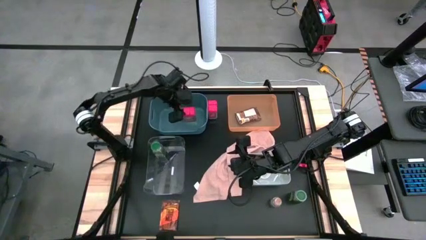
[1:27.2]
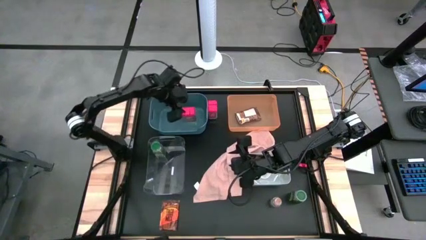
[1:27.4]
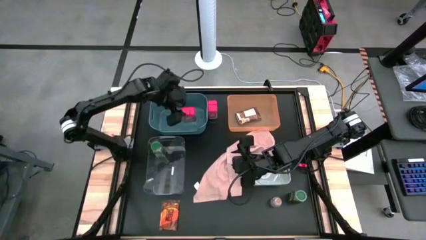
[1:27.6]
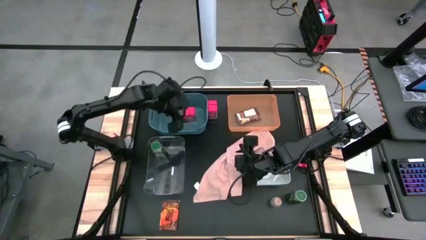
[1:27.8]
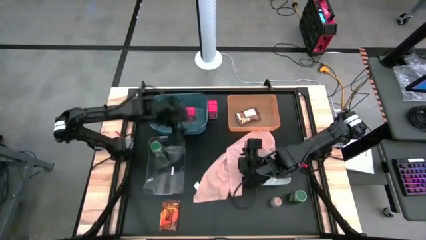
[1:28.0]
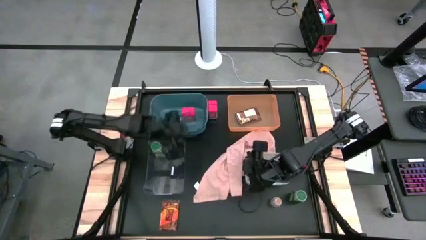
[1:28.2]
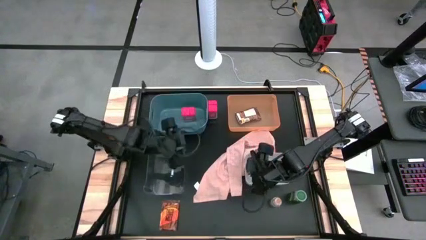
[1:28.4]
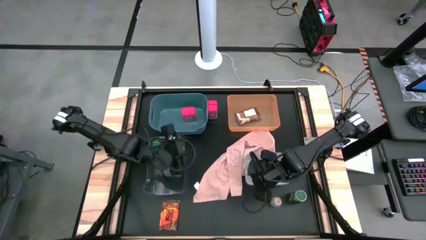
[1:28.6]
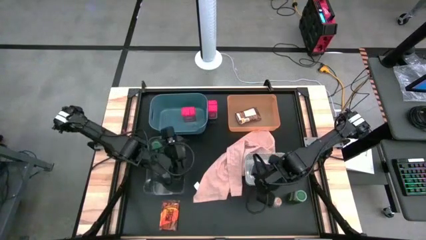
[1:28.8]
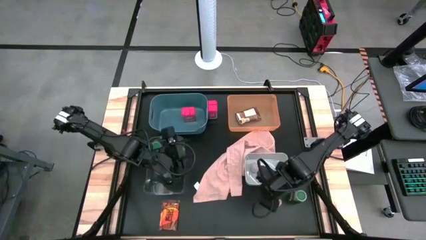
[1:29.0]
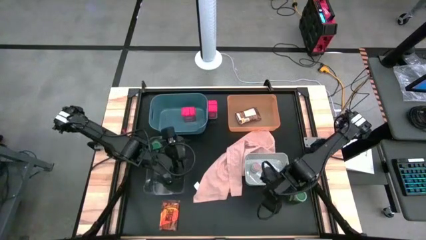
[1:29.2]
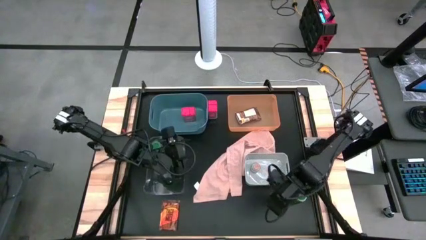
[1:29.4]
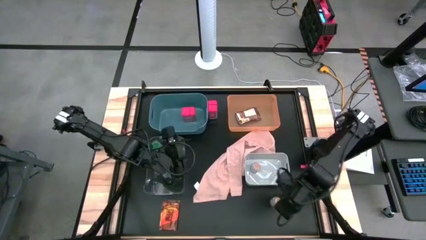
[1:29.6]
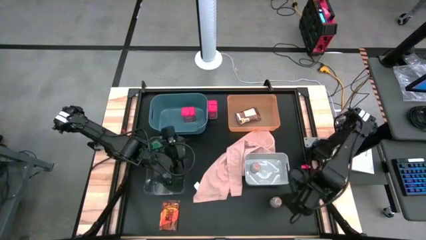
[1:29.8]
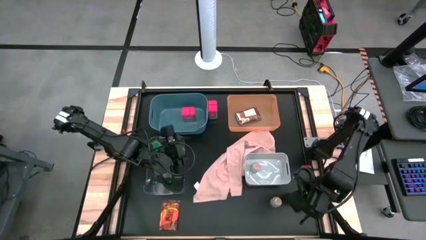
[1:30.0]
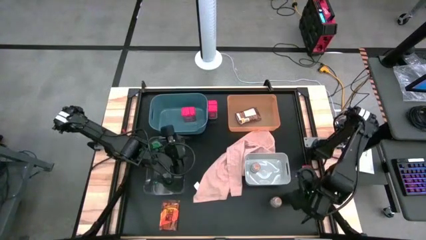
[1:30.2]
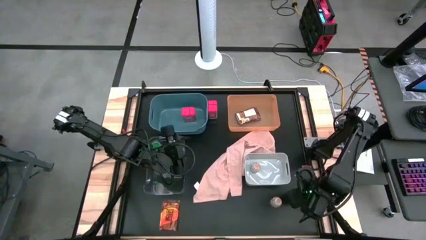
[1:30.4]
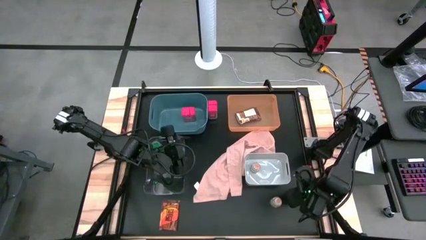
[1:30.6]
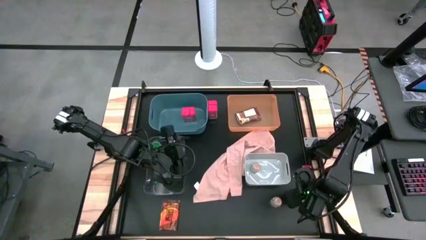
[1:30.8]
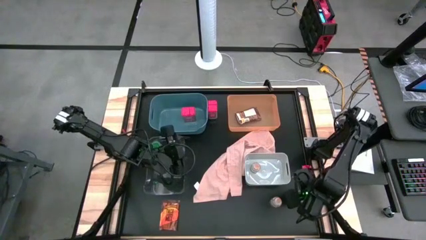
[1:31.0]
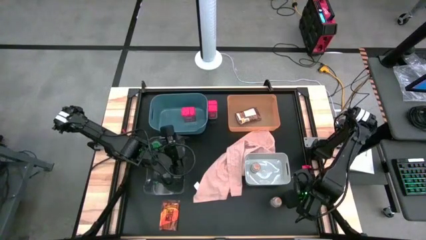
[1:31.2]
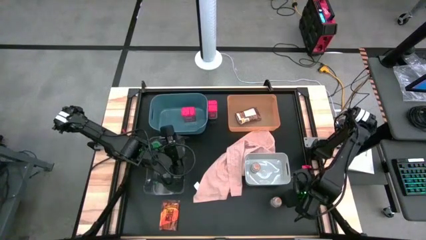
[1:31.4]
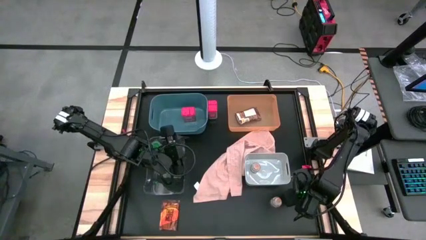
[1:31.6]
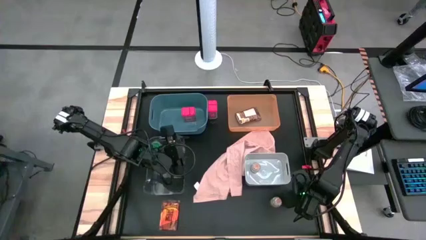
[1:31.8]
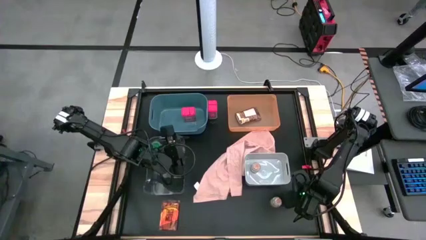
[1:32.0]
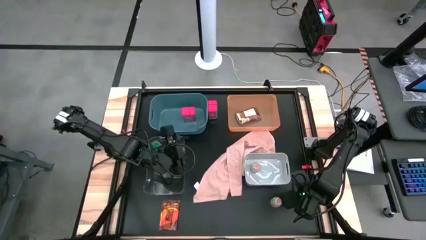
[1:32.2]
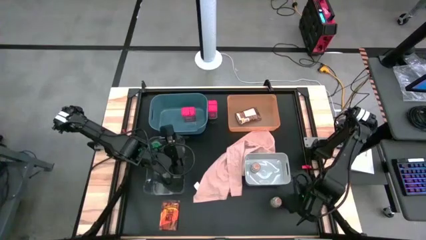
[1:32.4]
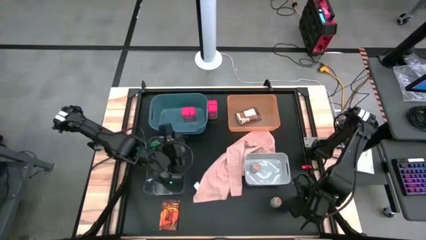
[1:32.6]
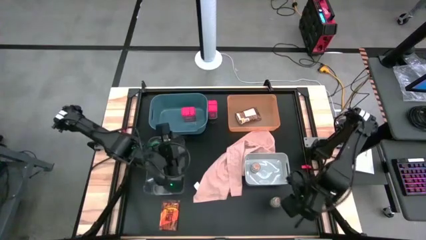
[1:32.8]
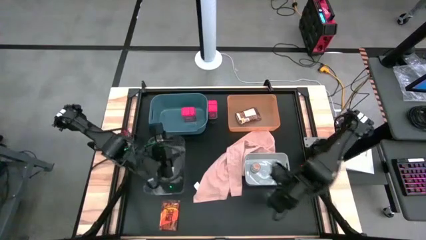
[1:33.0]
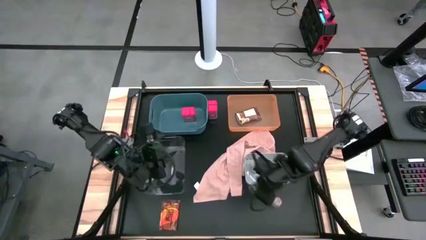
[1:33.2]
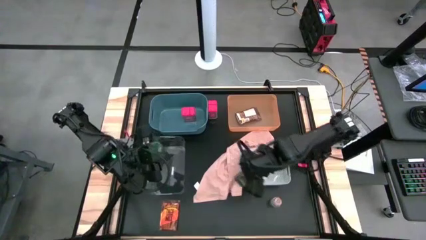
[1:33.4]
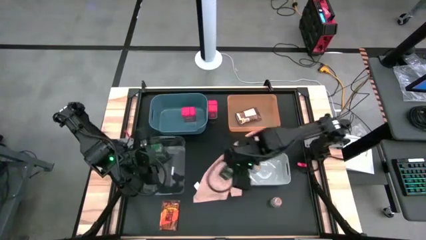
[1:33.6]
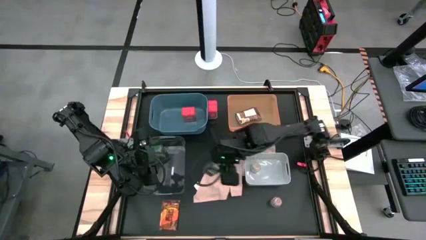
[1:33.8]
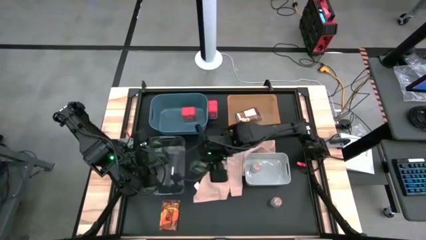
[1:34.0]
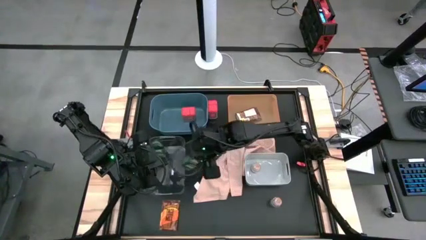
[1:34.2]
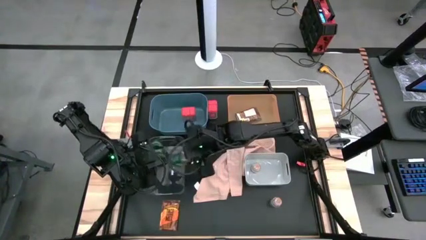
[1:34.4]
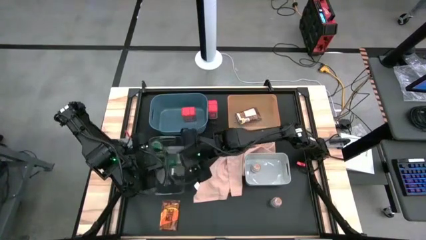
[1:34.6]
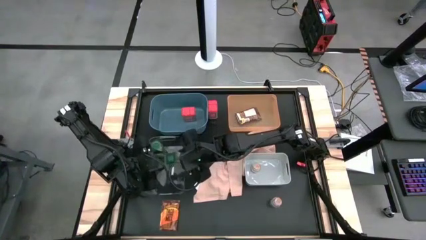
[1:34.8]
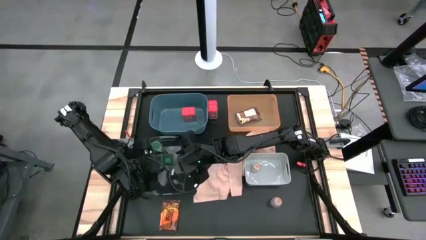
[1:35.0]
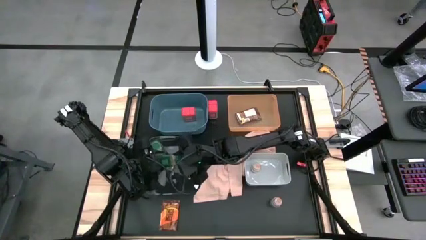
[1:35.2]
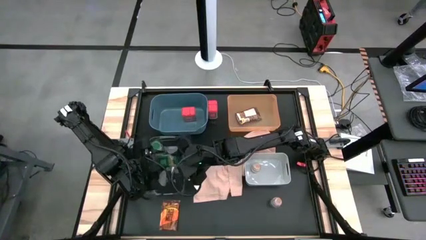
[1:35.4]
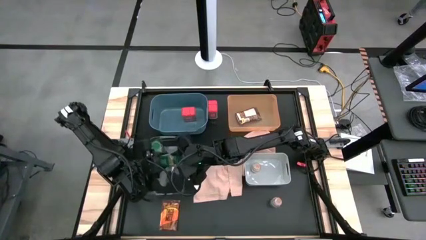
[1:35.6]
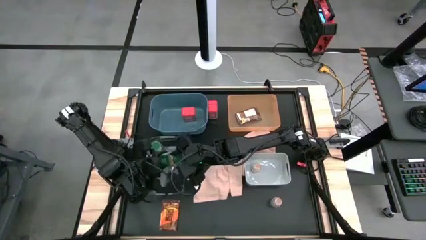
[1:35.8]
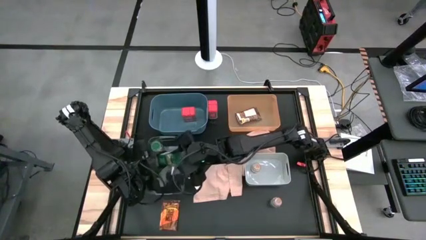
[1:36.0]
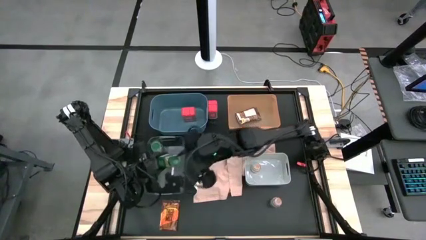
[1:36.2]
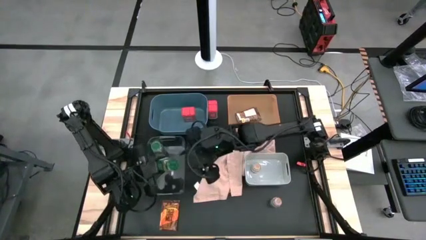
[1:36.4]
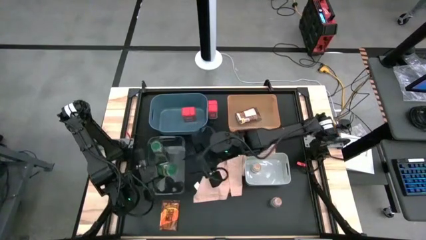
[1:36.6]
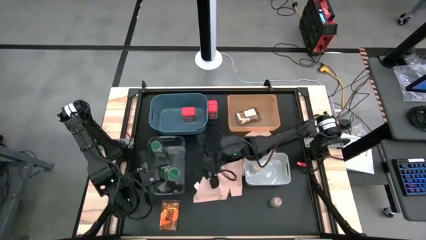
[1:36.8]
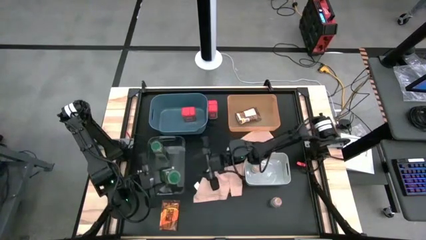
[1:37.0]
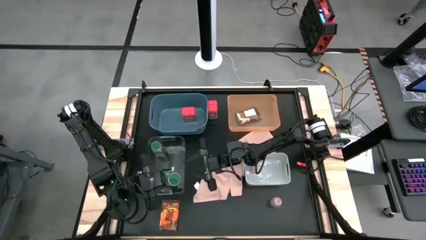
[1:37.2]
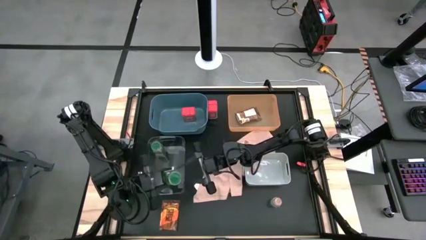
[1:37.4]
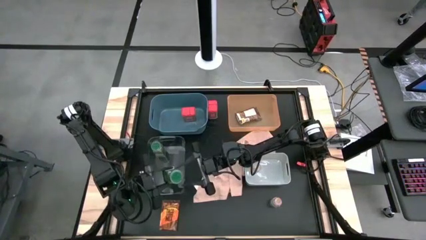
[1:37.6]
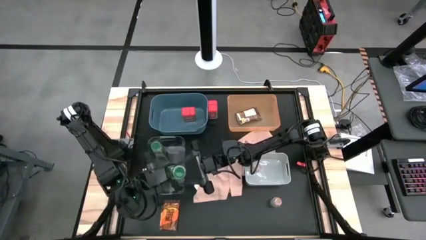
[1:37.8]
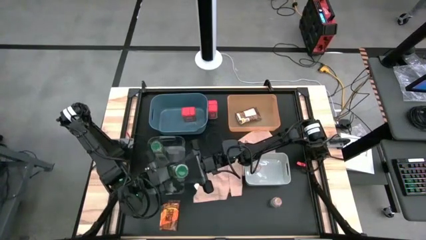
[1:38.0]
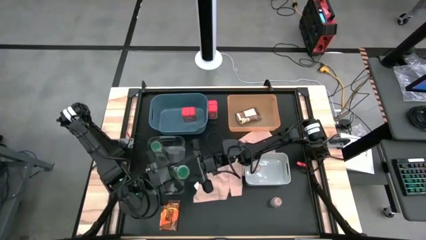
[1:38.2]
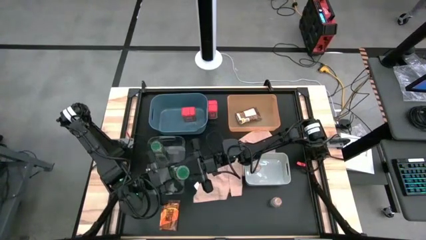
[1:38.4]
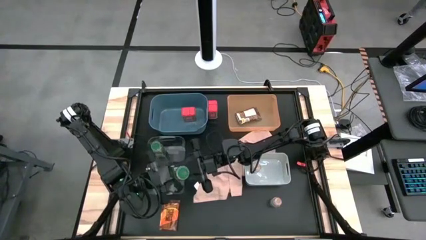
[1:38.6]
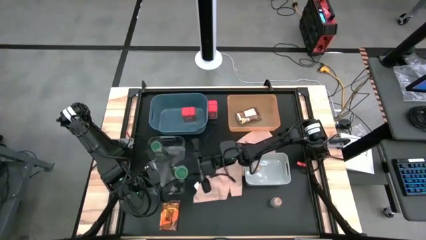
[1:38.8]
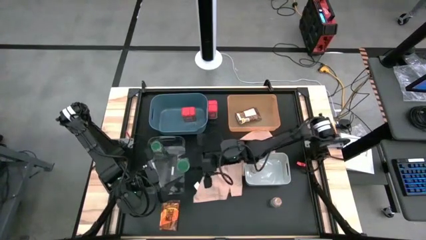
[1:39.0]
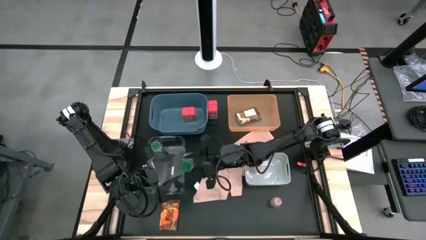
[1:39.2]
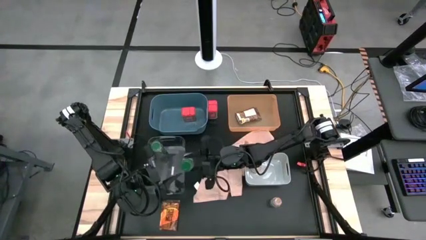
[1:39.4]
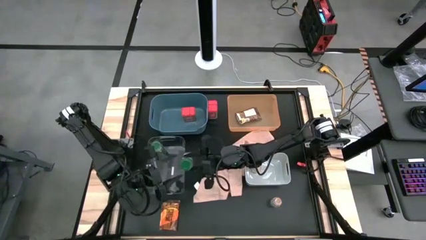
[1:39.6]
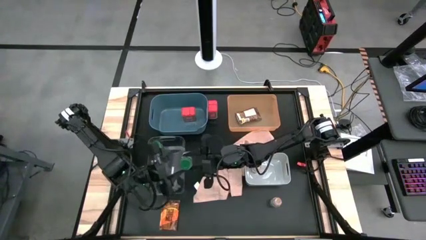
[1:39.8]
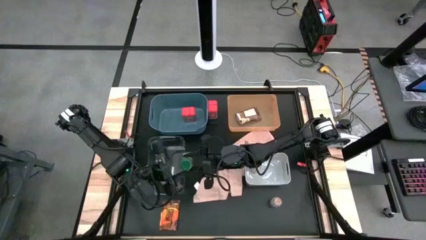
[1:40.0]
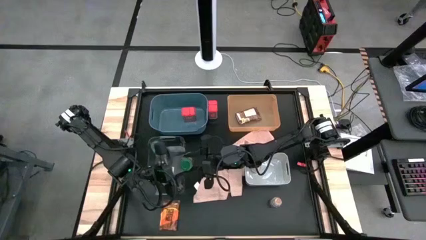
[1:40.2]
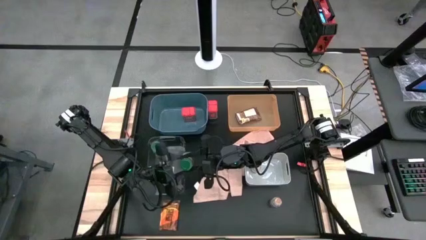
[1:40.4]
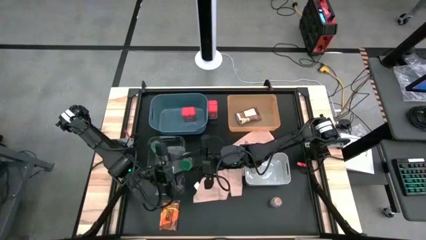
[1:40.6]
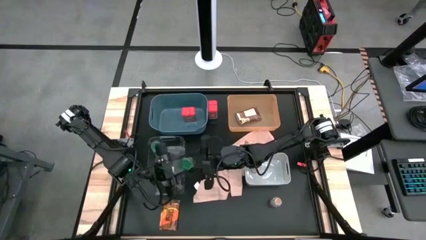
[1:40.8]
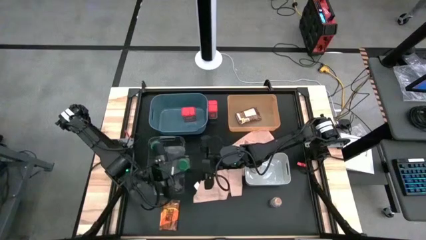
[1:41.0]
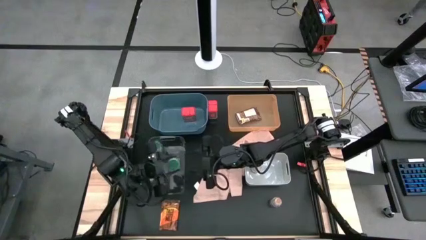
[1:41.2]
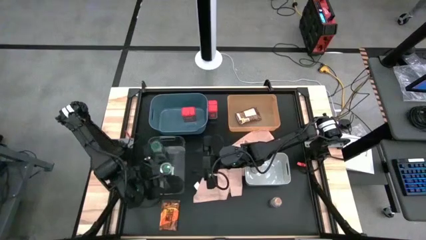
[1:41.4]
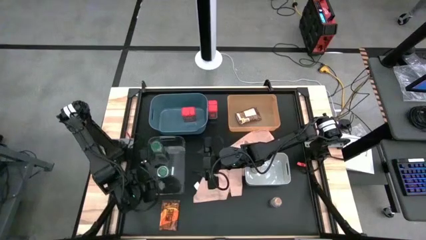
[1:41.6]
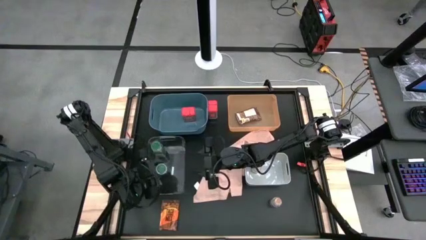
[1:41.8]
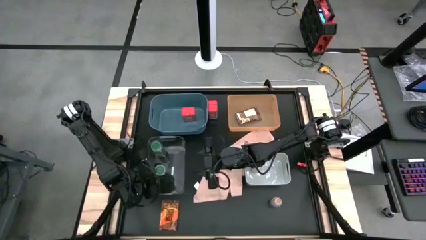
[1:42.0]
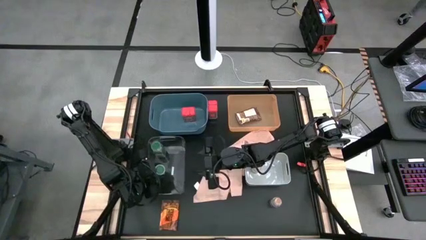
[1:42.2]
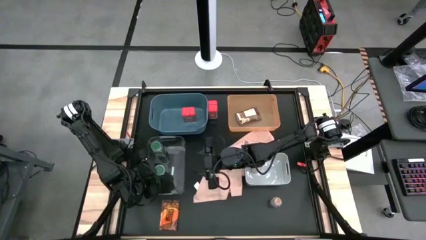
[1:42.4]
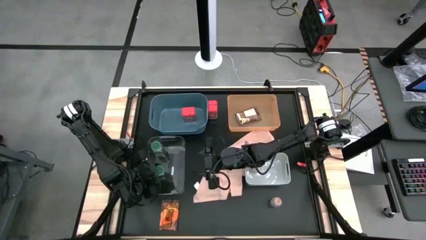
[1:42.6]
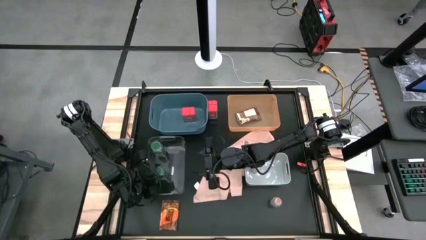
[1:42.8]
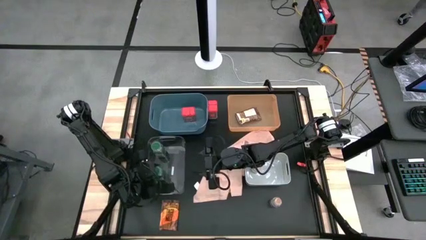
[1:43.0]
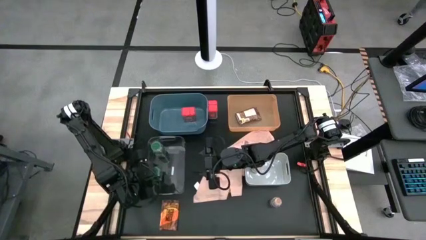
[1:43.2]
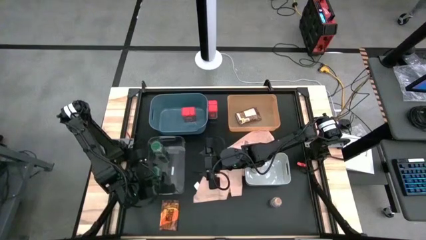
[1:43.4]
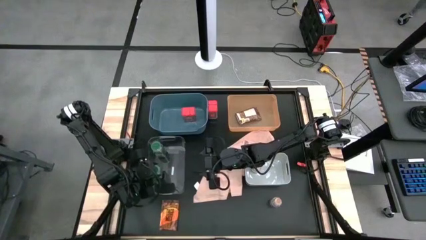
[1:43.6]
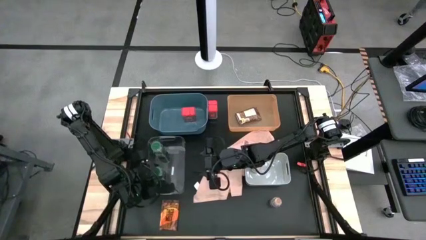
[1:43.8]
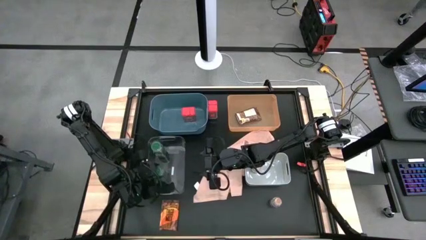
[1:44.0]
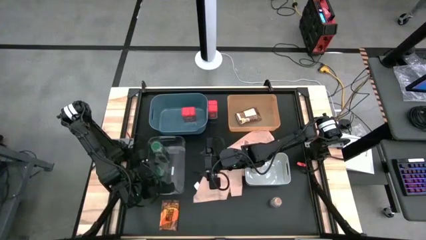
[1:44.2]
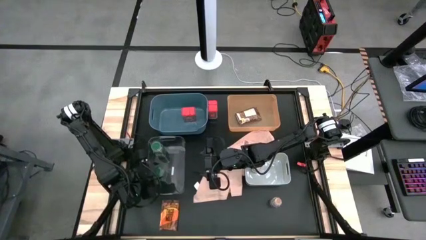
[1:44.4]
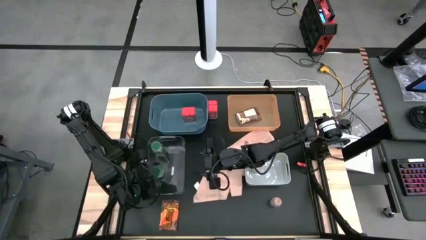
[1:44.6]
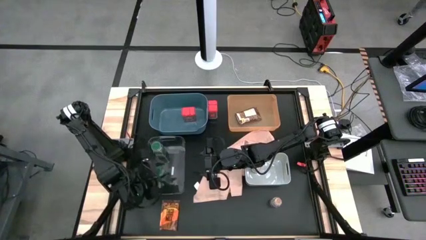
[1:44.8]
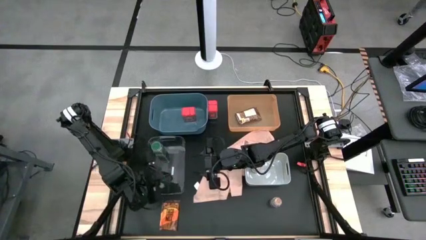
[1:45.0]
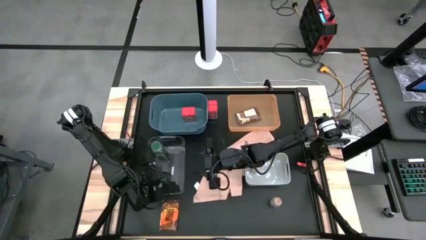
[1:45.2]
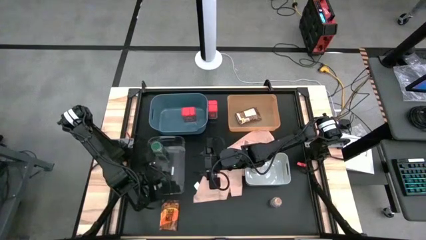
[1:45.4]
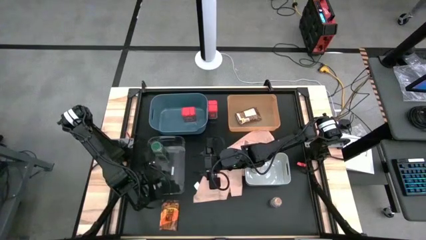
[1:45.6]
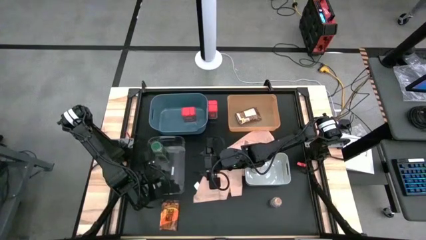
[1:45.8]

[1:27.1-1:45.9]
Task: Sort spices by type
Put the green seasoning bottle into the transparent bin
